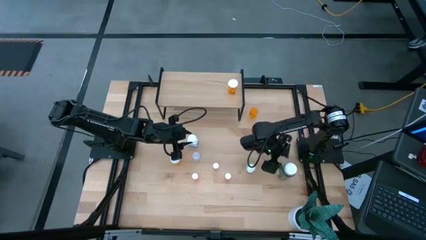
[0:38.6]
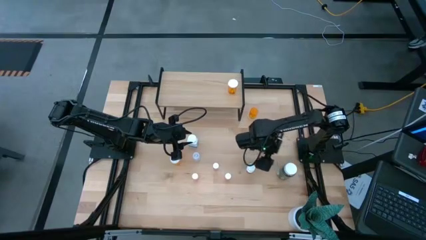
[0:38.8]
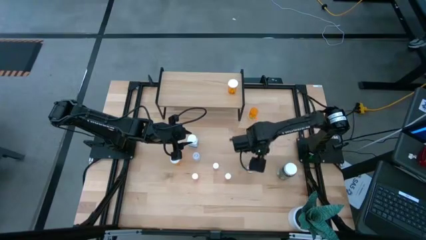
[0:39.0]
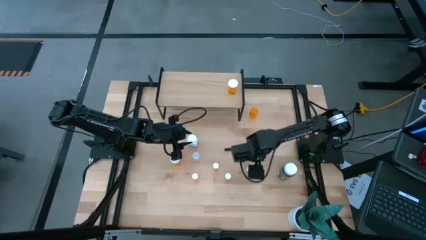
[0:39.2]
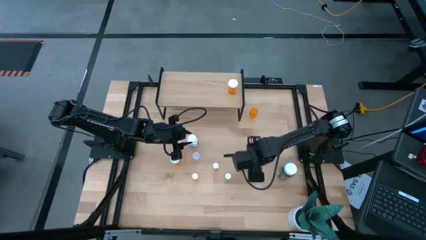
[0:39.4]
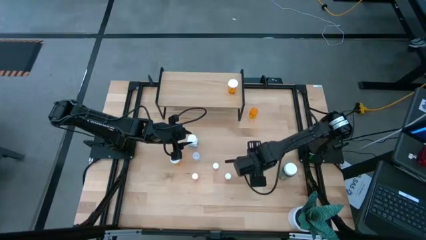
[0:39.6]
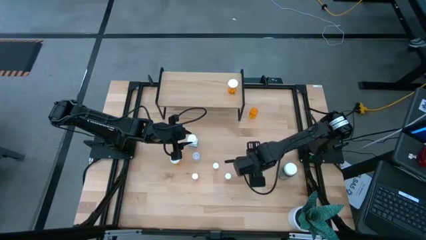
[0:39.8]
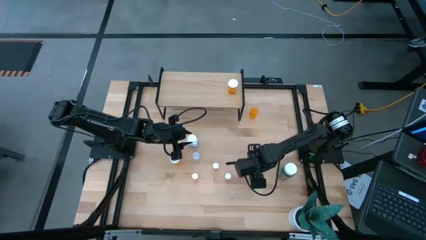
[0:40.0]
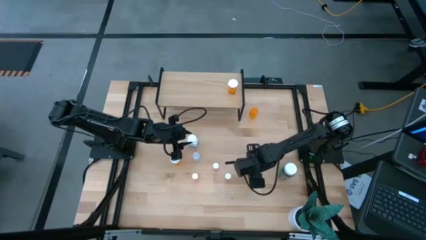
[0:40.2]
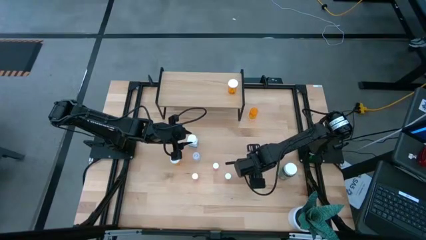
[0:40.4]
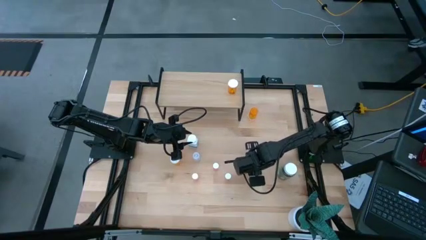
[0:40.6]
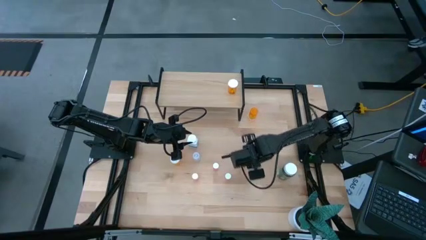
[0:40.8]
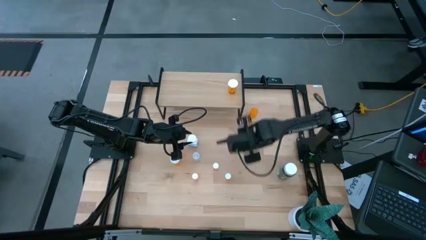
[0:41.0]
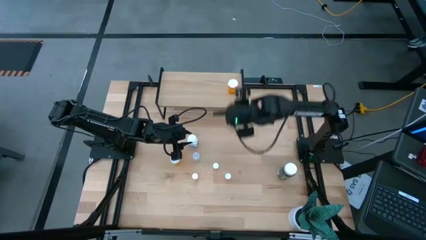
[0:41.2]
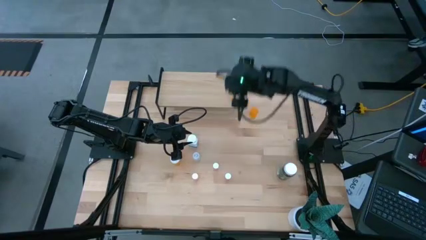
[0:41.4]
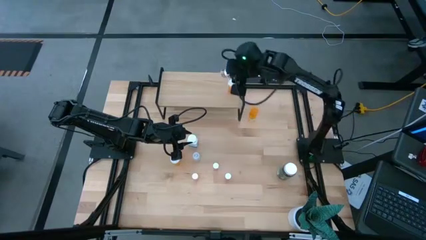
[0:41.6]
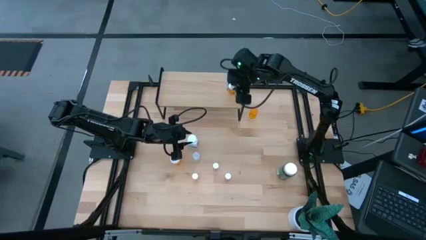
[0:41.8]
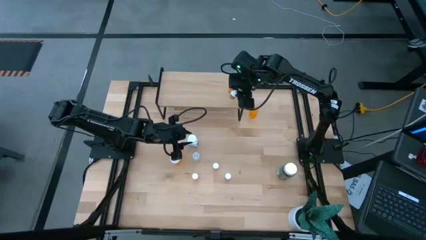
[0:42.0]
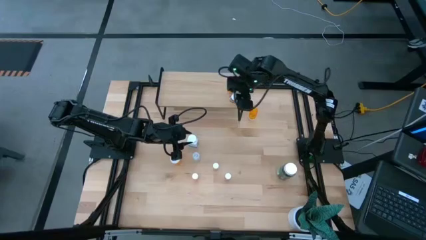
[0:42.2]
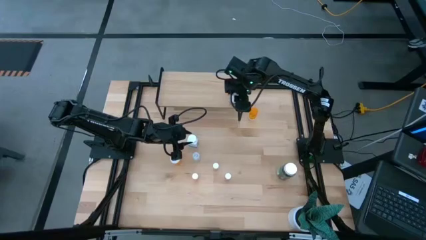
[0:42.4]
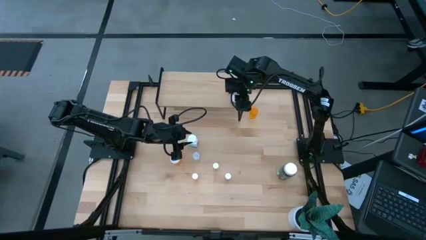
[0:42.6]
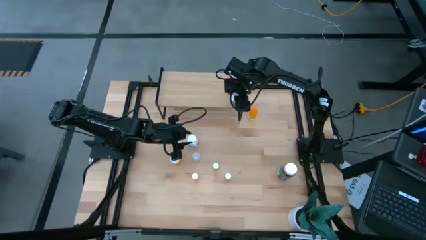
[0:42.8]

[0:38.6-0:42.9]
Task: Pick and place medicine bottles onto shelf by color
Put the white pill bottle on the shelf

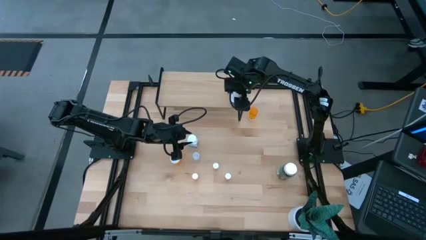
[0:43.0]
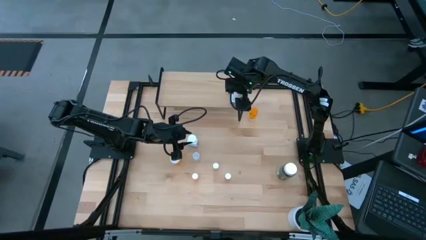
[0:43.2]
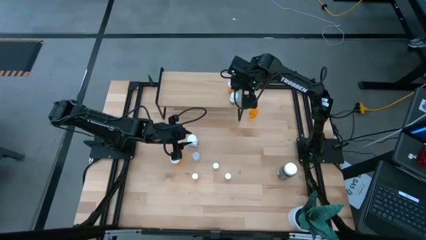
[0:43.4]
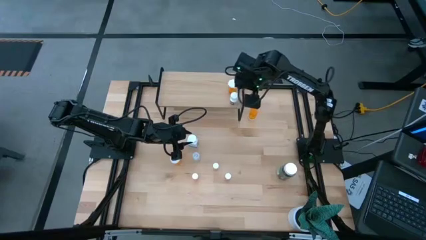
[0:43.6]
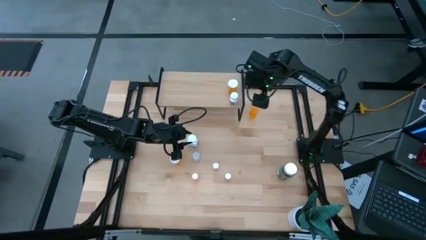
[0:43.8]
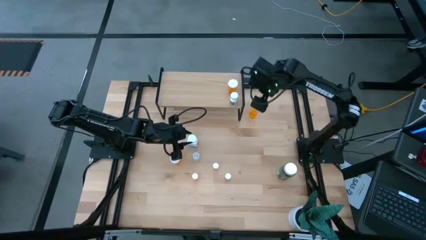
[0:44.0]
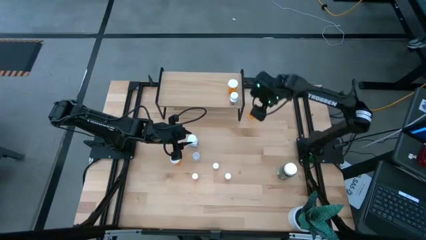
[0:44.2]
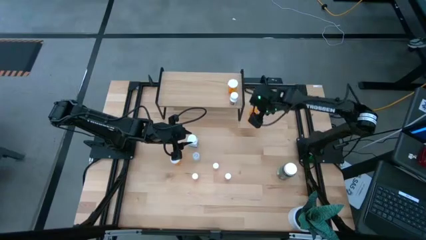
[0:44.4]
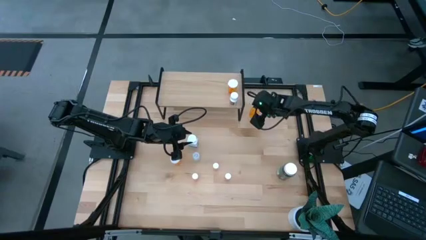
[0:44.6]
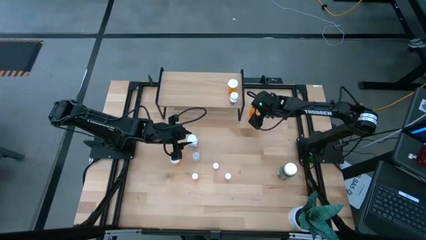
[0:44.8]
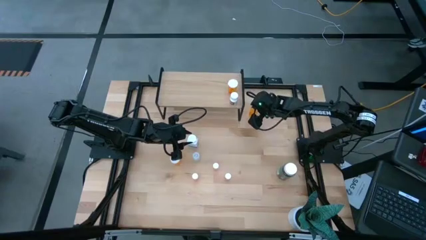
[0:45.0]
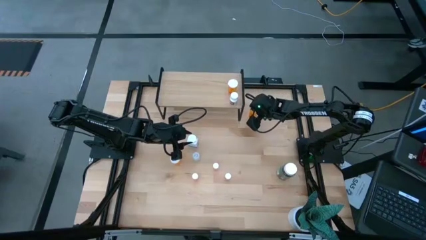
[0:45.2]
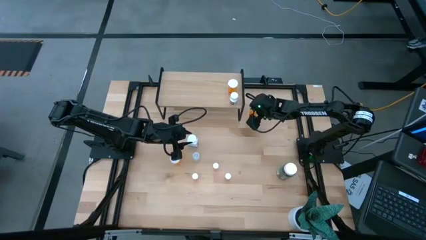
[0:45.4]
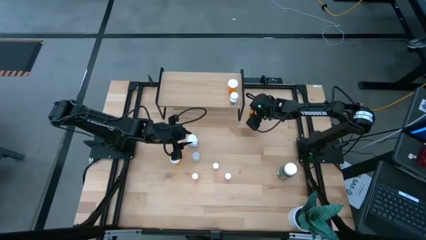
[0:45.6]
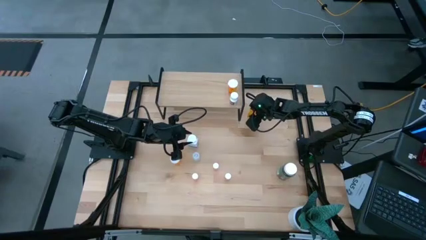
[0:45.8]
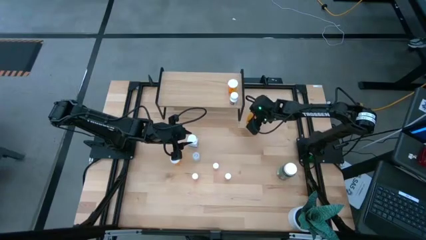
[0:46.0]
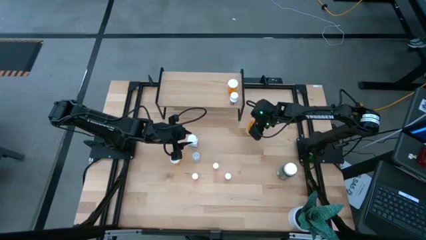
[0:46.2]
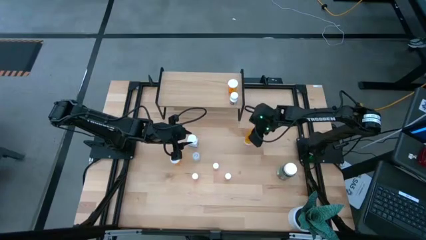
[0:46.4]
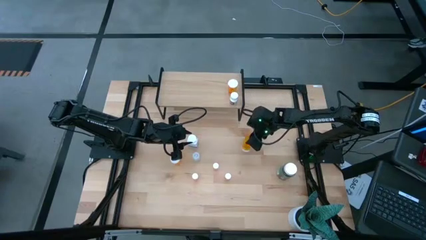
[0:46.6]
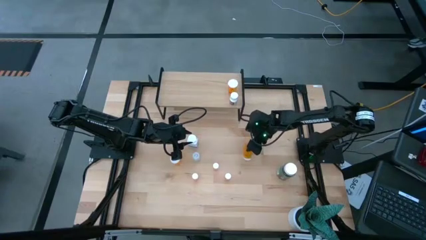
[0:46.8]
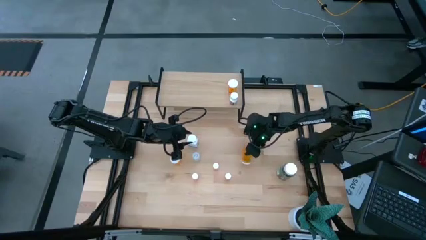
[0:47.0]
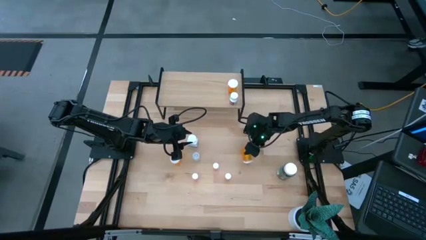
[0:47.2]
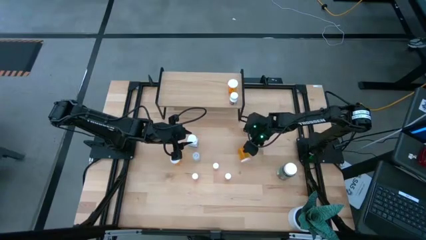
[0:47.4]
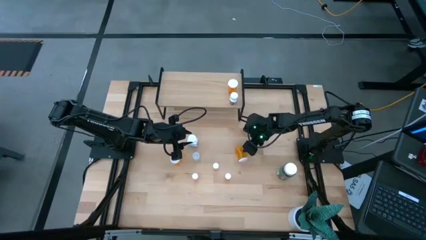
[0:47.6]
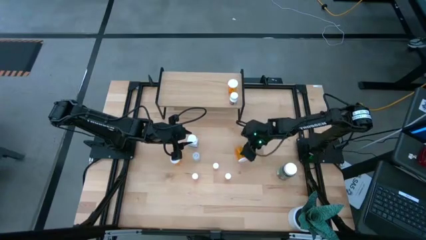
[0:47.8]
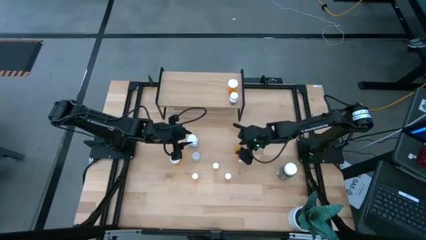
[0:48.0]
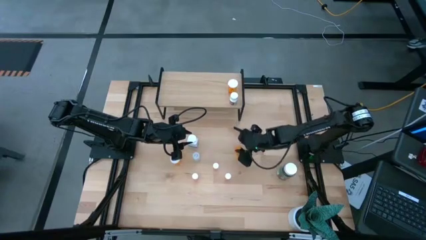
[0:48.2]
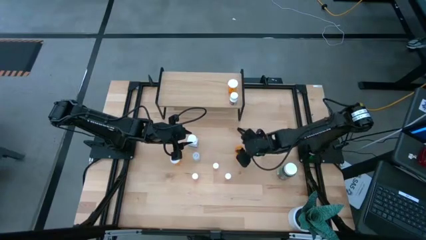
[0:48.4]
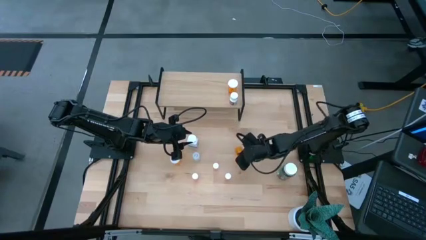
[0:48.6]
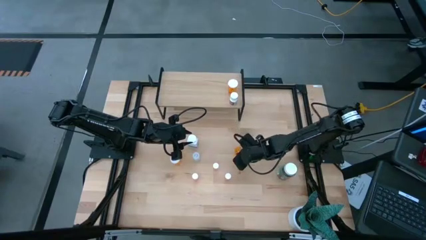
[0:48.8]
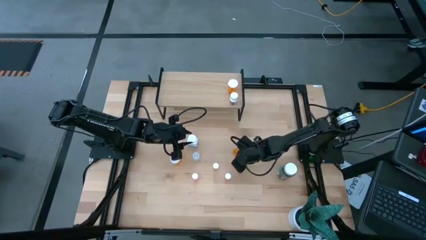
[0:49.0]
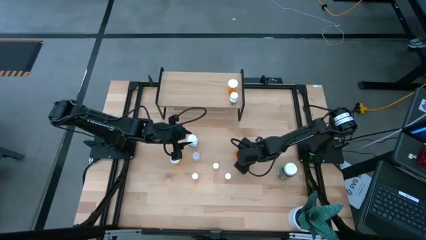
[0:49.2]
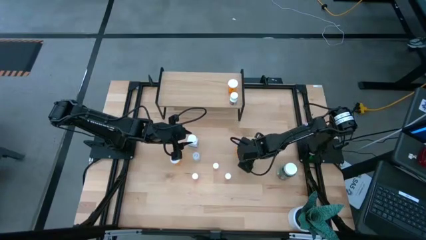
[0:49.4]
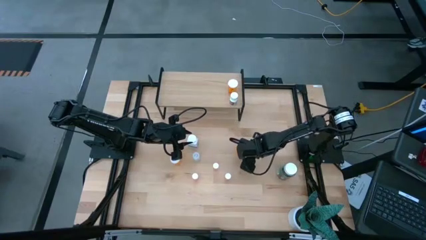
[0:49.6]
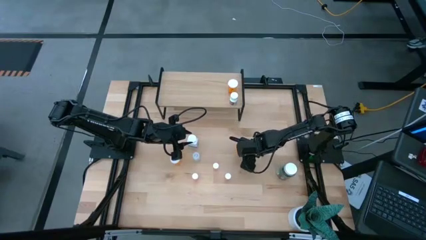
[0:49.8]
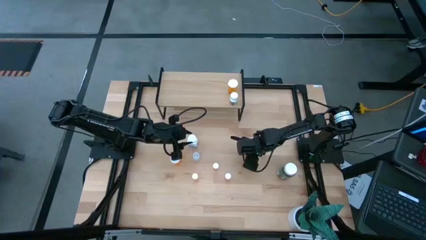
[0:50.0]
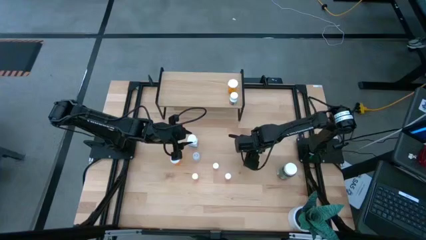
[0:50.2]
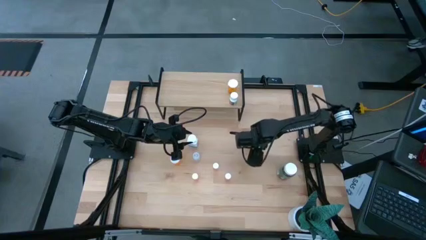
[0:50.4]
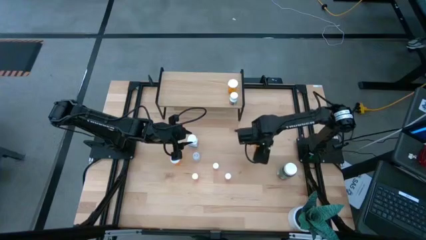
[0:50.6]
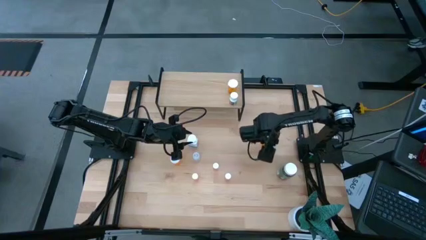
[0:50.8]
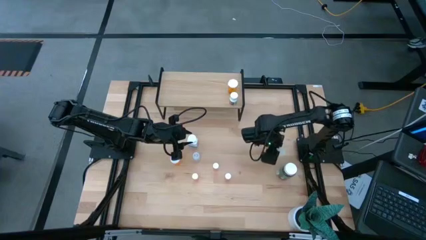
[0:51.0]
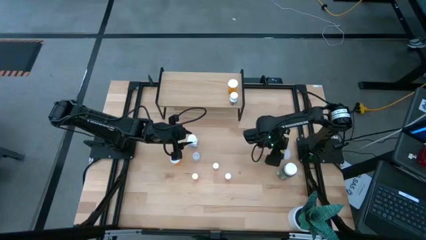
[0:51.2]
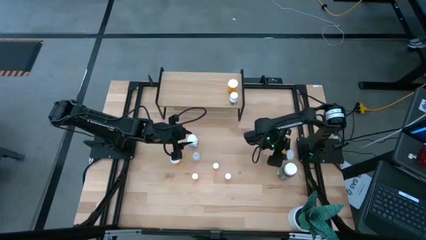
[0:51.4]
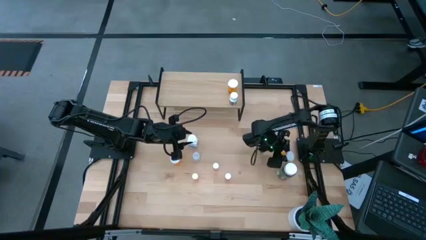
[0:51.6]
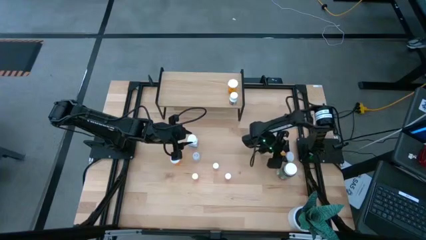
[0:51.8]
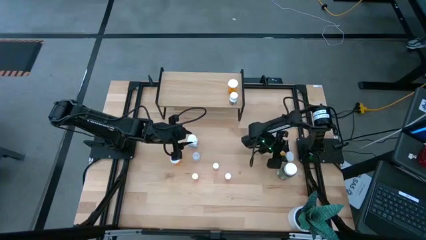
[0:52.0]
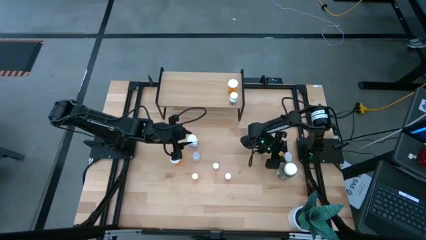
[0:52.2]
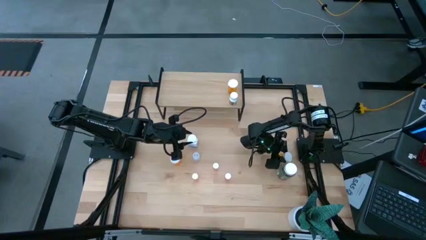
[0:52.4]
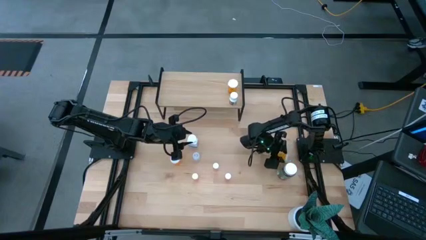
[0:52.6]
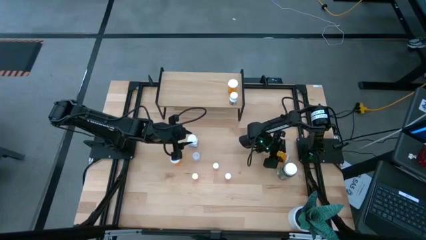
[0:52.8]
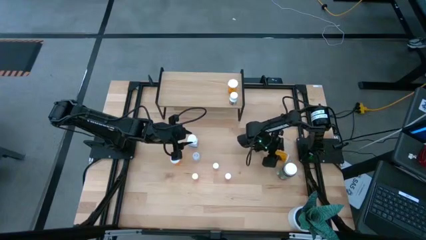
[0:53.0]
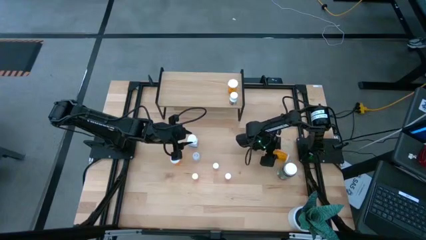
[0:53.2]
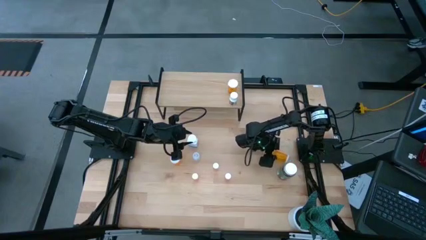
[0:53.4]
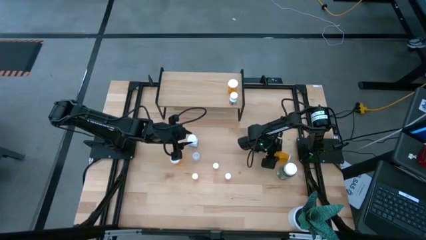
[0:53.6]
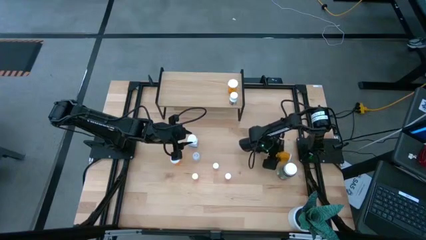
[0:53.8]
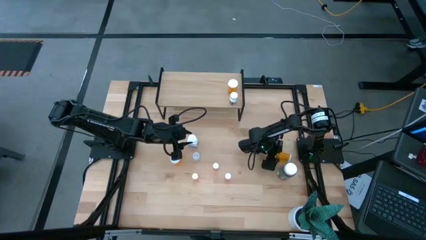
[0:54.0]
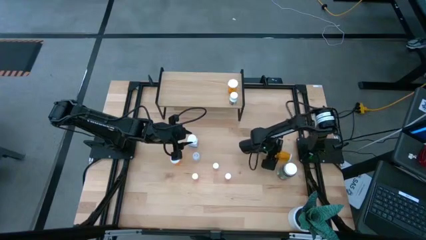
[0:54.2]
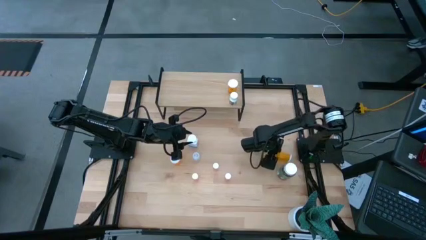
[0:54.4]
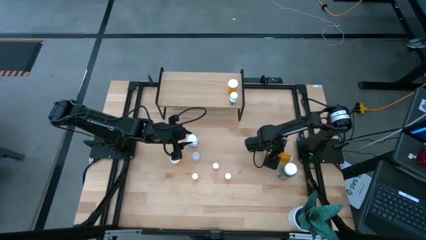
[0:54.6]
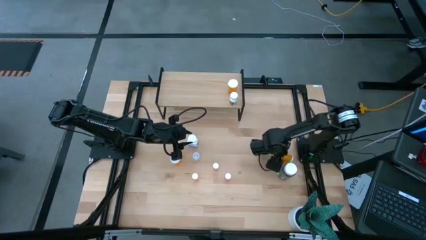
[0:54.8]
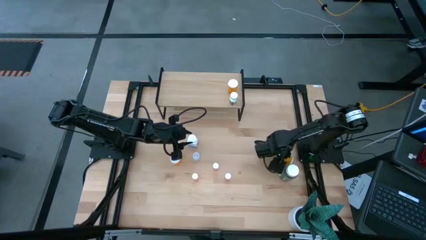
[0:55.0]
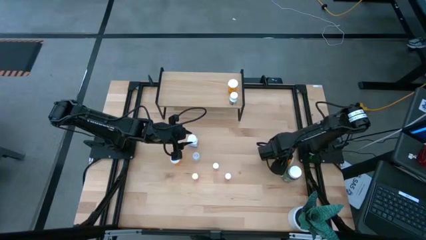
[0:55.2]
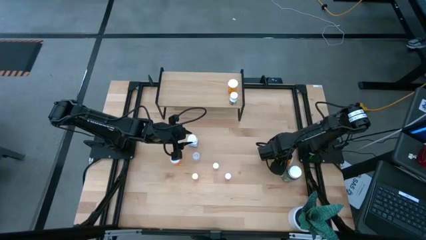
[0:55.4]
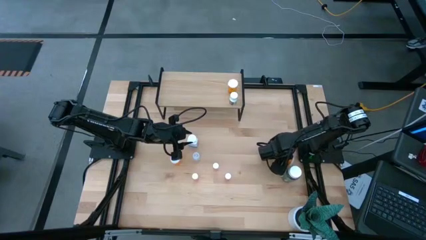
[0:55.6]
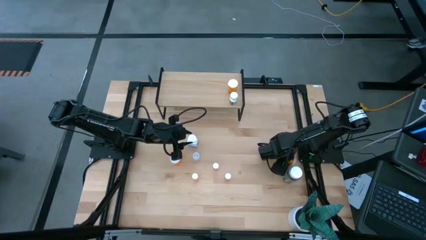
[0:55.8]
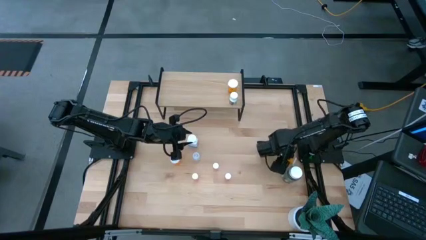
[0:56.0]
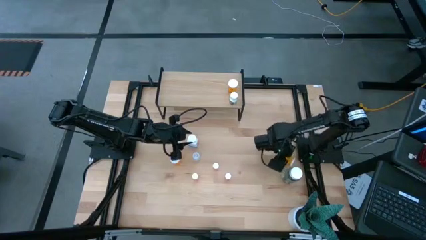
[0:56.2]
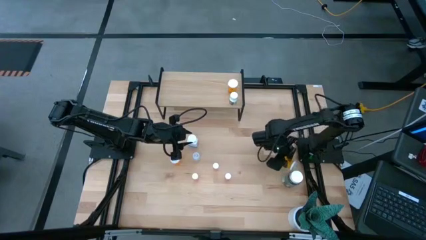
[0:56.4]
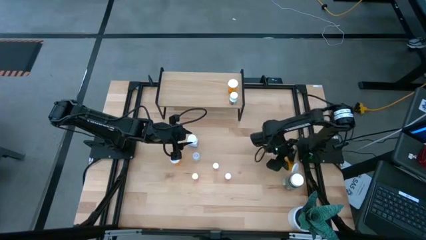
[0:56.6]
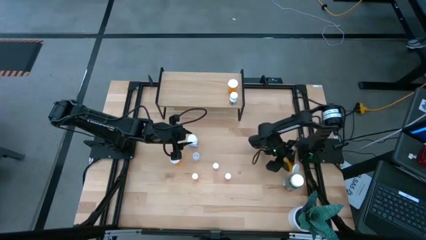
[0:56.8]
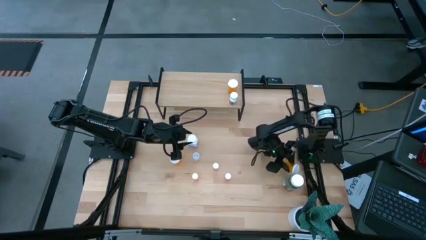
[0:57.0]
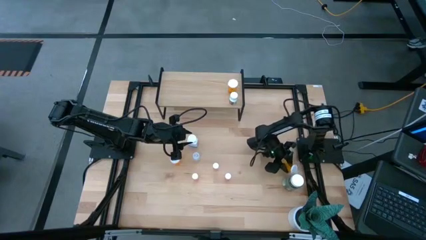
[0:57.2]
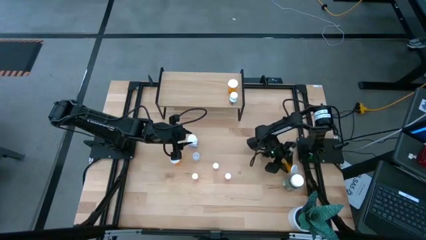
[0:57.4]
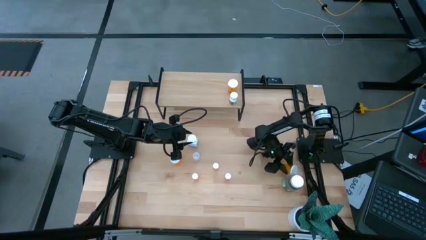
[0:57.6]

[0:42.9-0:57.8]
Put the top orange pill bottle on the shelf
